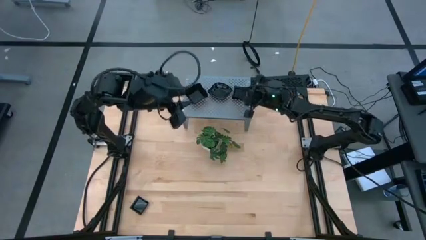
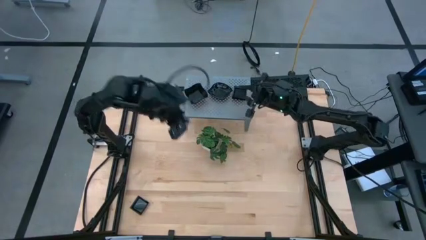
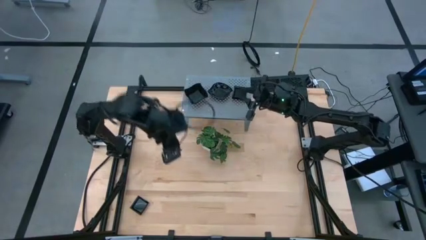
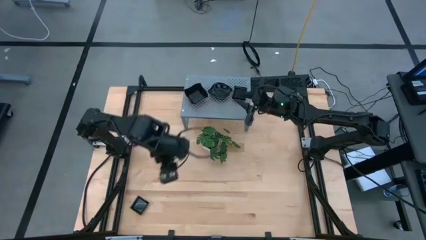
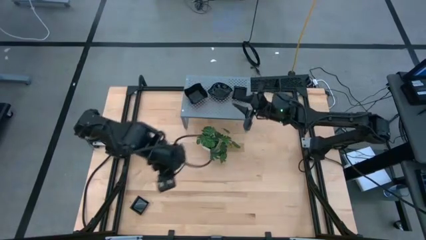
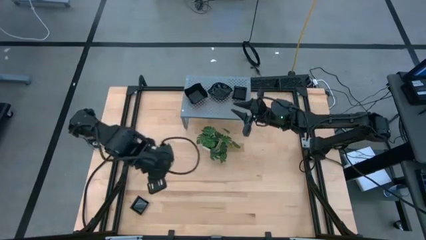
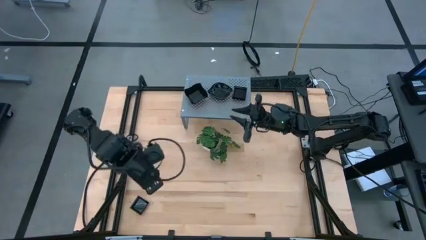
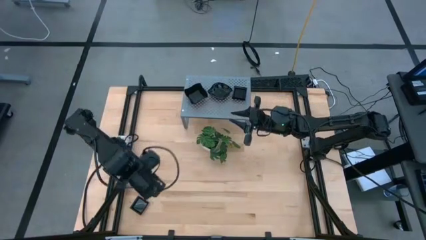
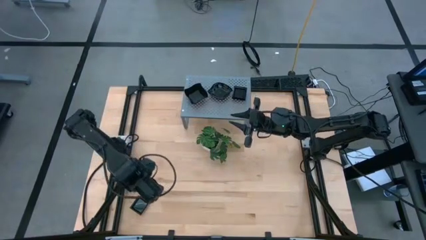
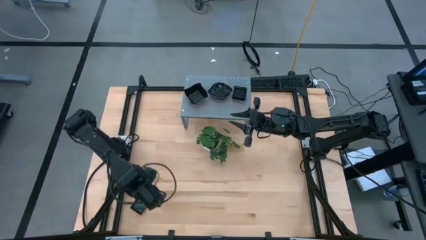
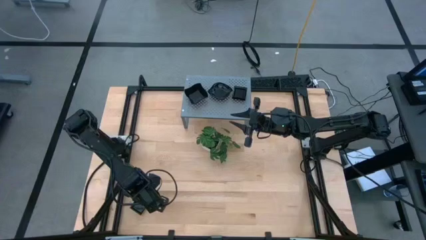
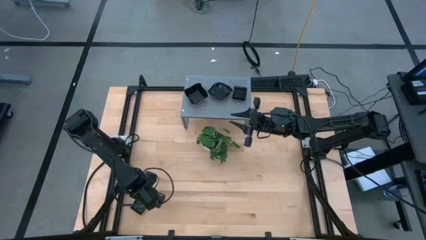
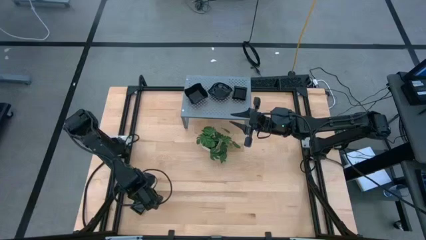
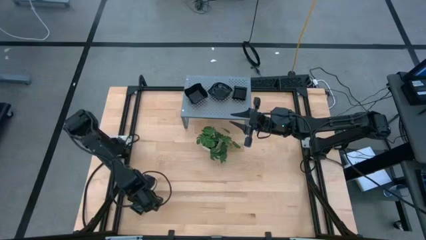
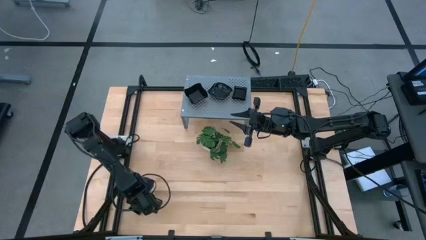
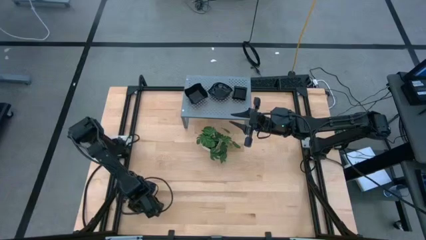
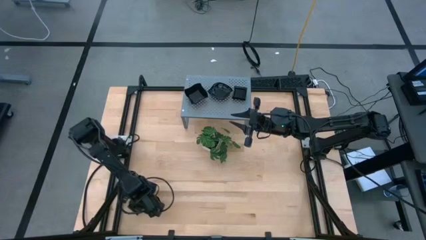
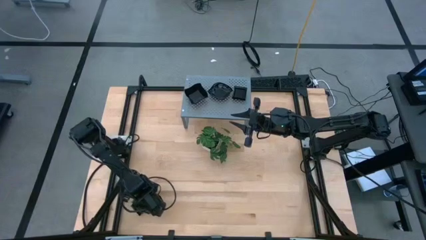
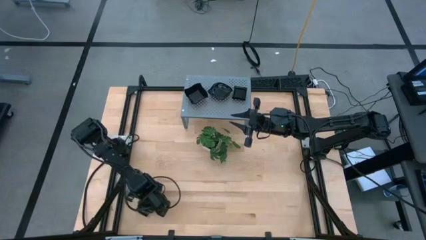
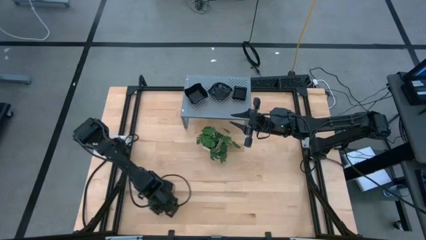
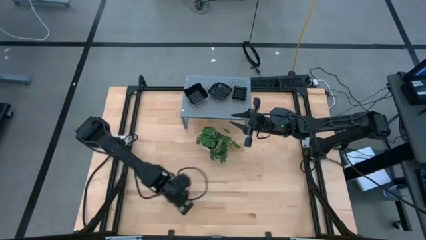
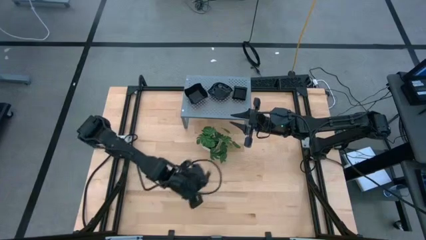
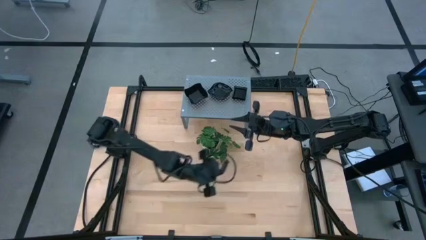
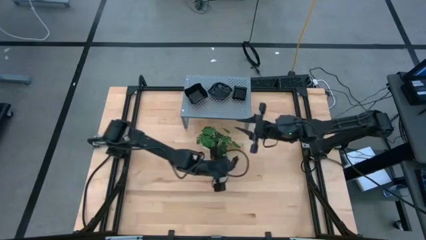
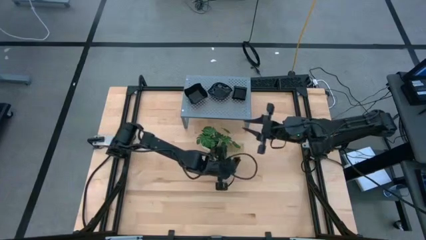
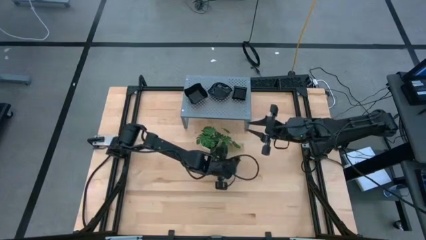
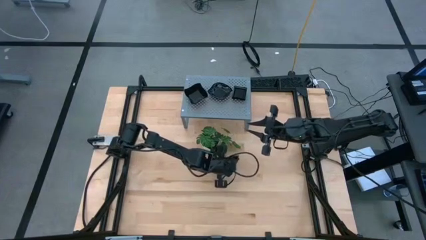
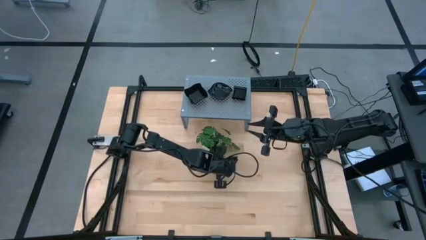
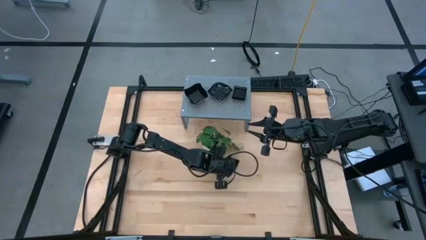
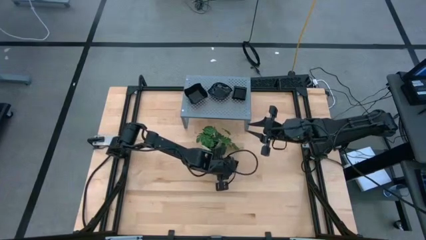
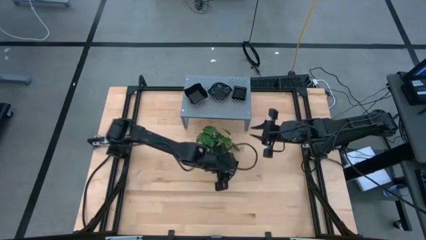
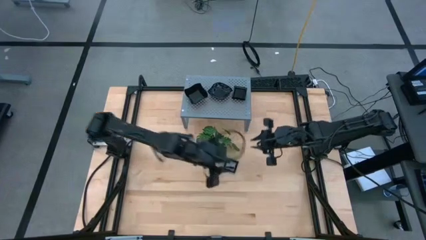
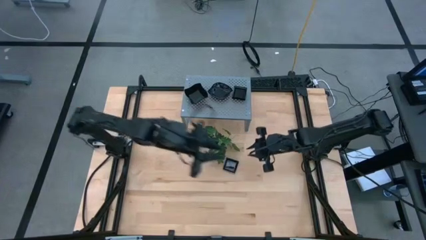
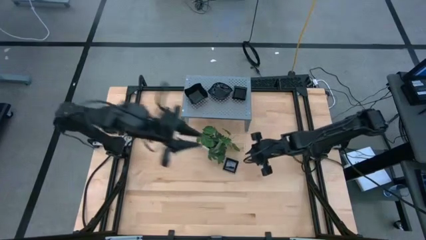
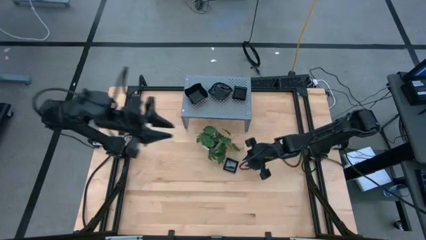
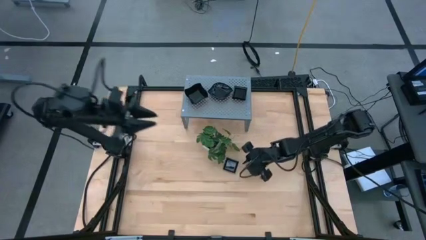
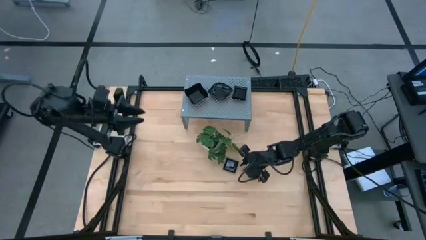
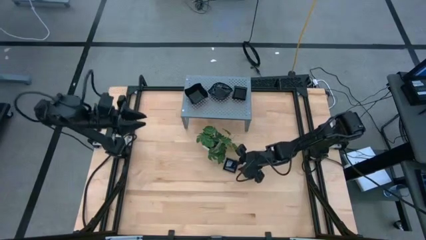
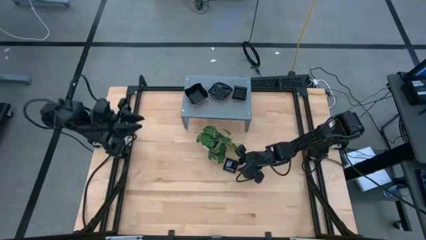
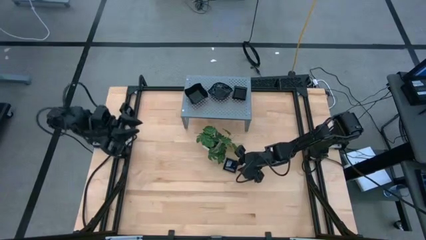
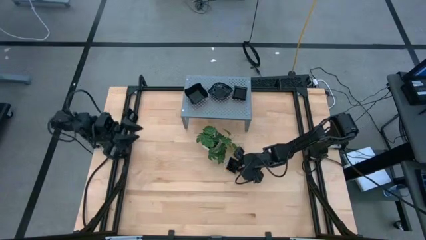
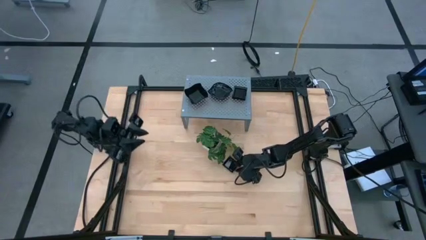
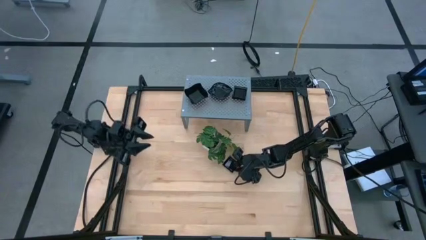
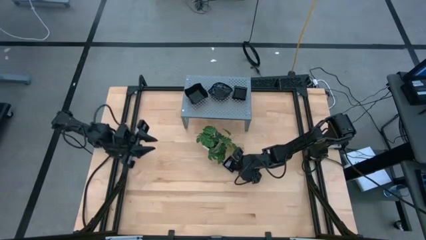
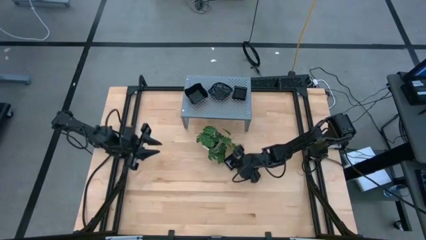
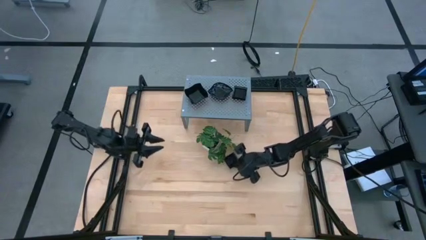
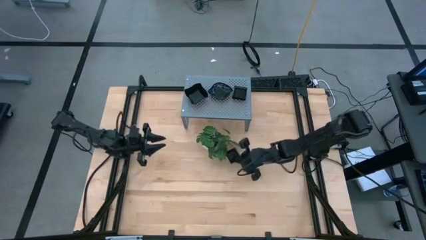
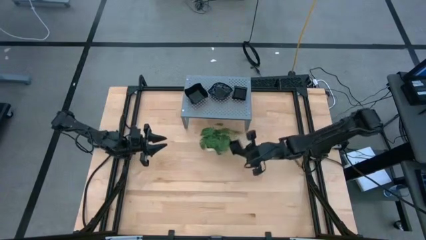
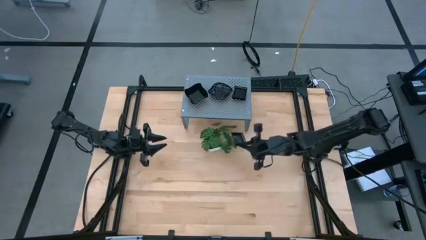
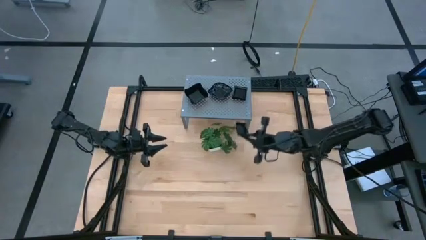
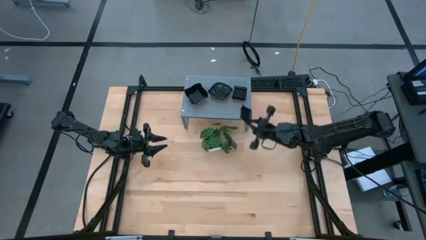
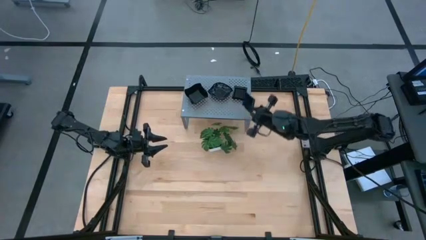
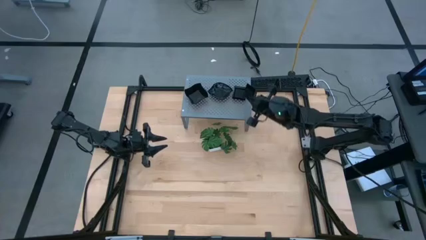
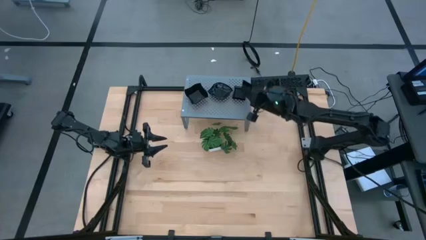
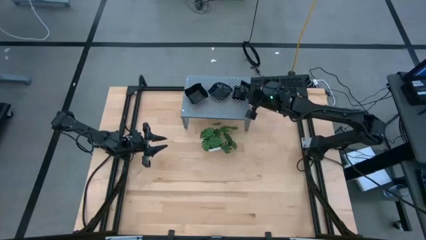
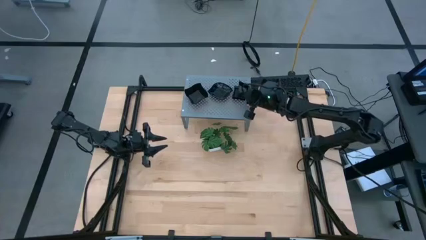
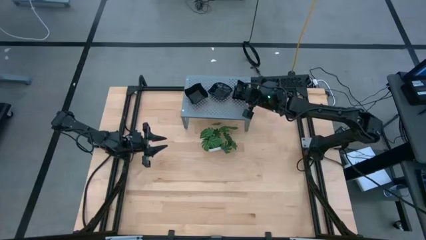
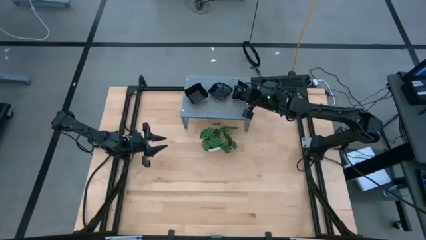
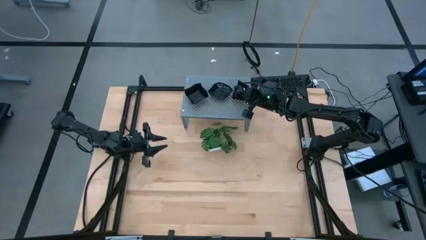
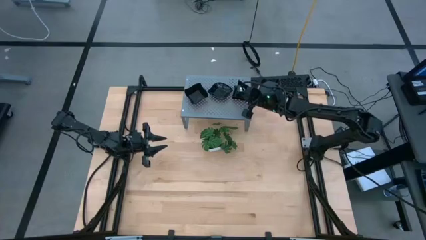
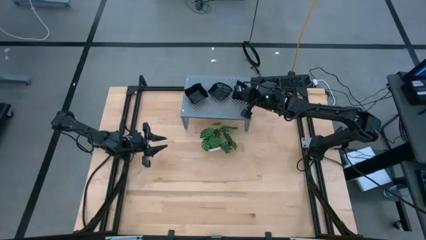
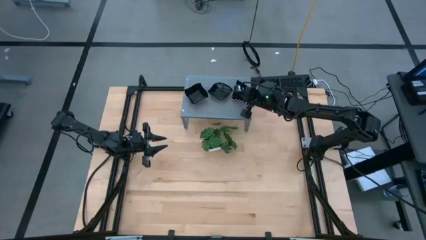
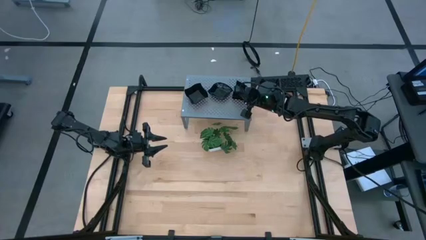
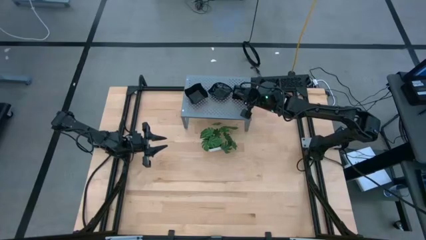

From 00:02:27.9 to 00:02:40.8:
Task: Pick & Place Mini shaped plates
Stack the square plate on top of the stacked square plates on the shelf
